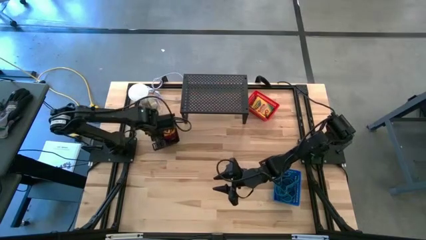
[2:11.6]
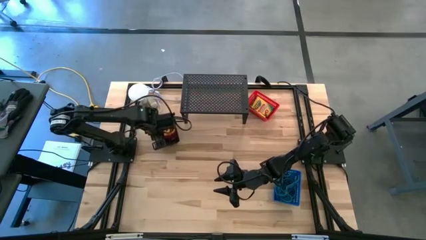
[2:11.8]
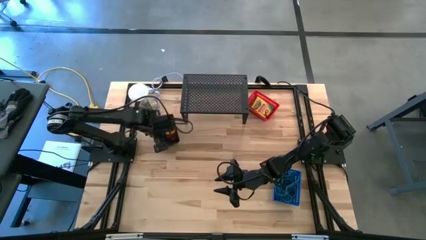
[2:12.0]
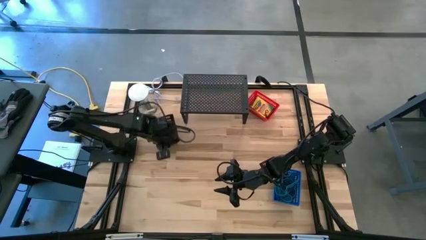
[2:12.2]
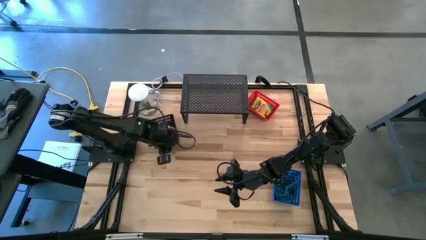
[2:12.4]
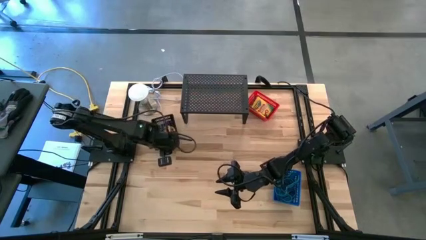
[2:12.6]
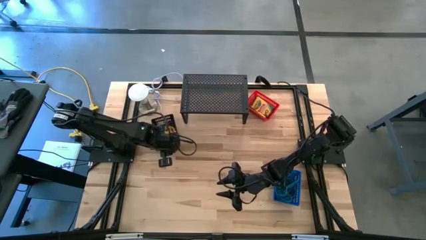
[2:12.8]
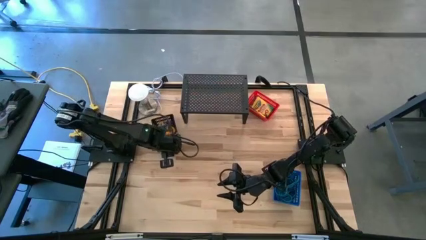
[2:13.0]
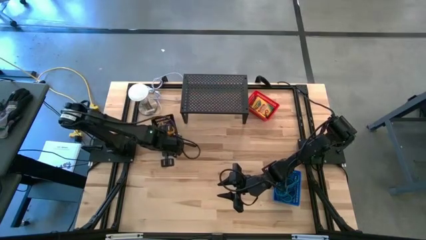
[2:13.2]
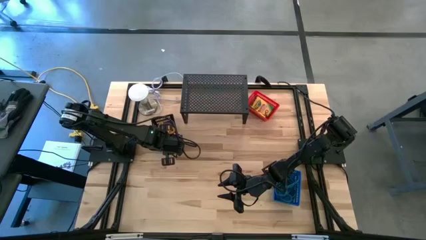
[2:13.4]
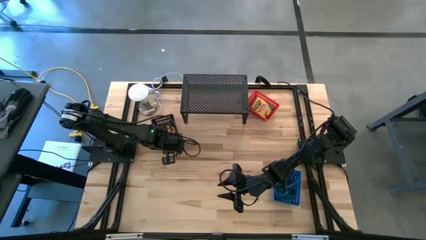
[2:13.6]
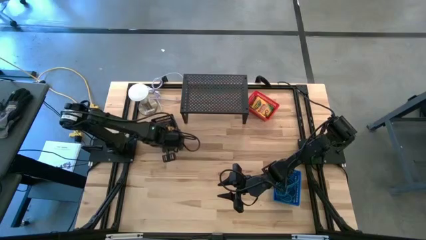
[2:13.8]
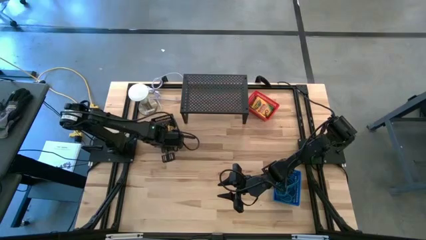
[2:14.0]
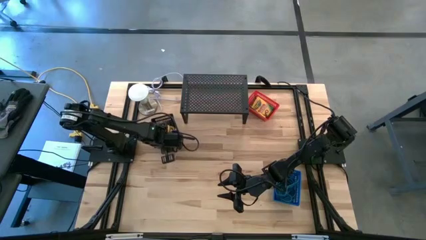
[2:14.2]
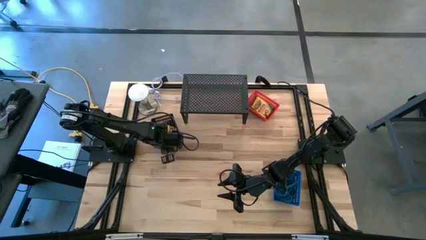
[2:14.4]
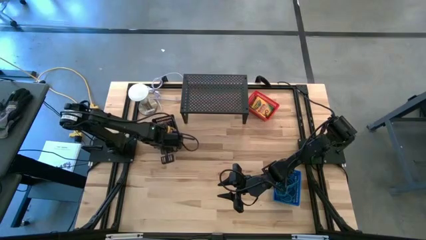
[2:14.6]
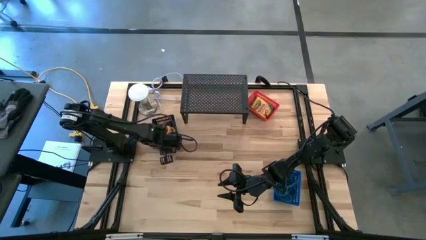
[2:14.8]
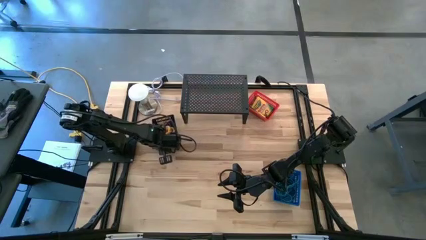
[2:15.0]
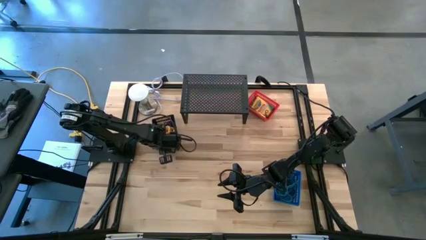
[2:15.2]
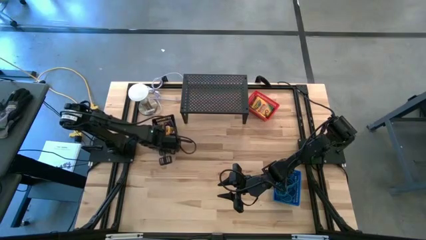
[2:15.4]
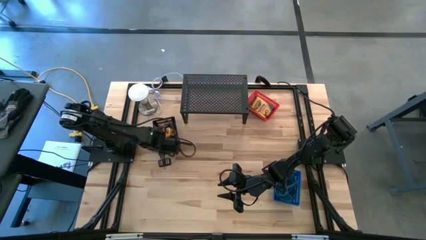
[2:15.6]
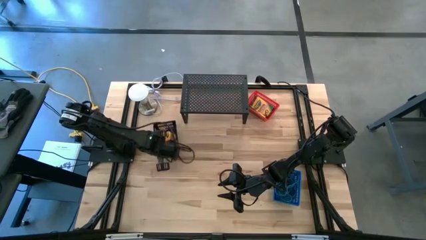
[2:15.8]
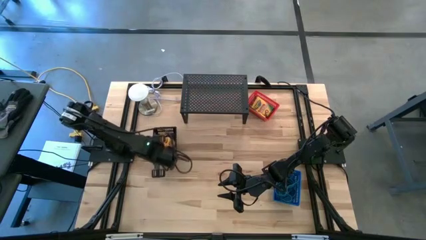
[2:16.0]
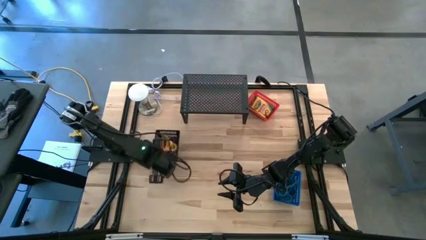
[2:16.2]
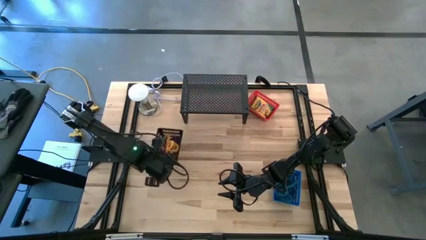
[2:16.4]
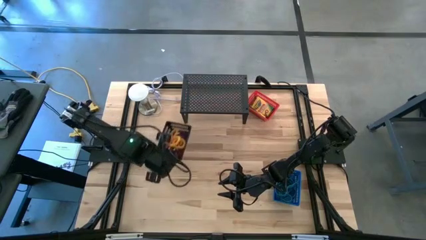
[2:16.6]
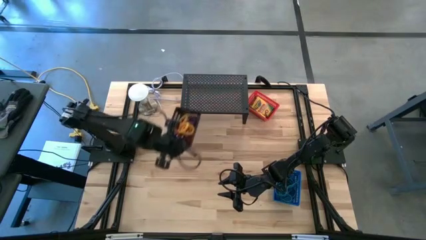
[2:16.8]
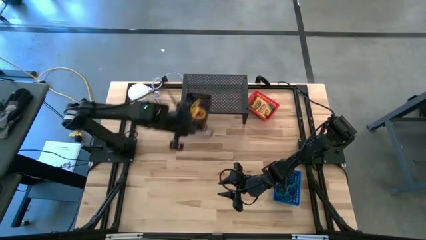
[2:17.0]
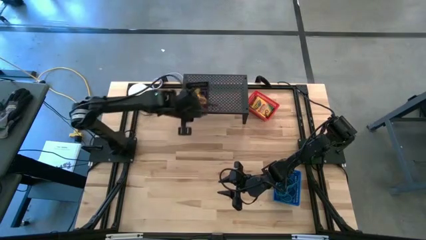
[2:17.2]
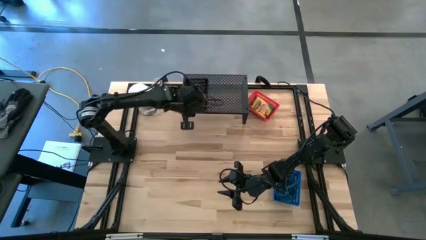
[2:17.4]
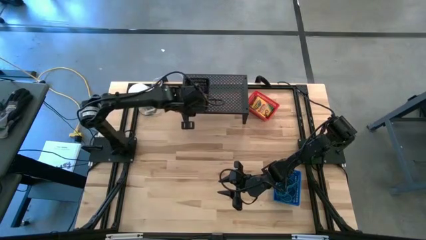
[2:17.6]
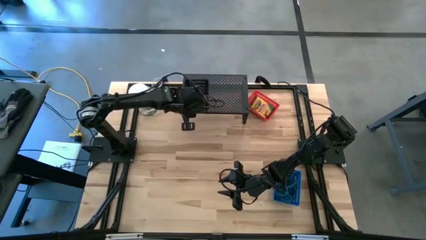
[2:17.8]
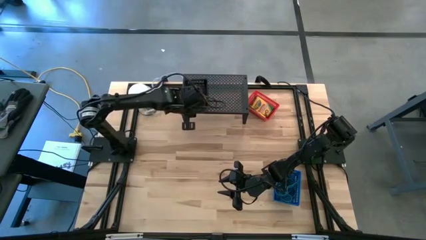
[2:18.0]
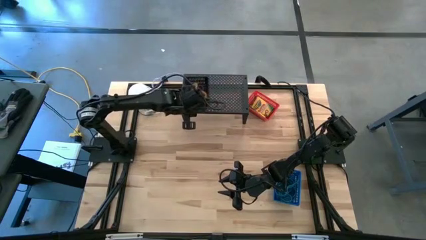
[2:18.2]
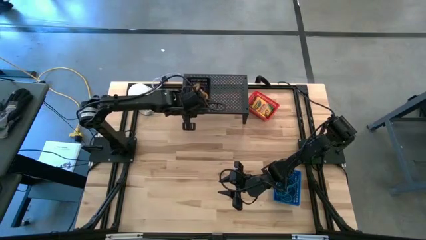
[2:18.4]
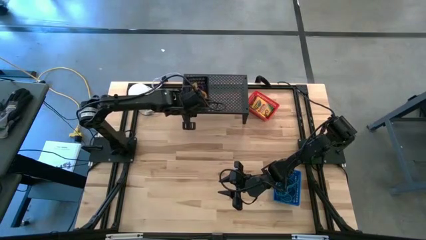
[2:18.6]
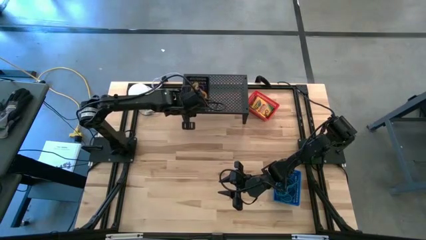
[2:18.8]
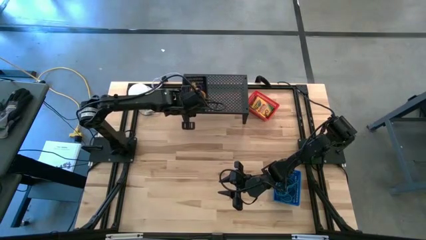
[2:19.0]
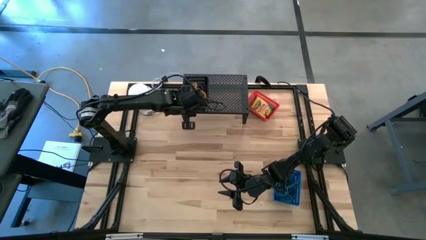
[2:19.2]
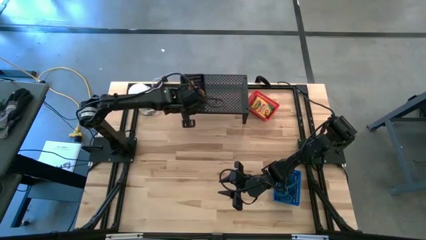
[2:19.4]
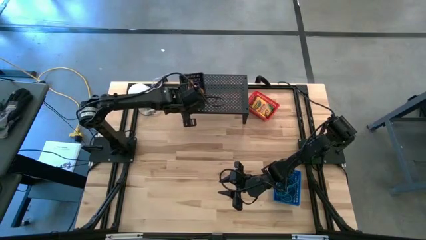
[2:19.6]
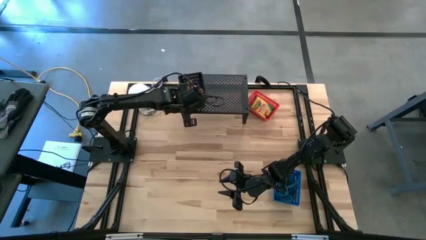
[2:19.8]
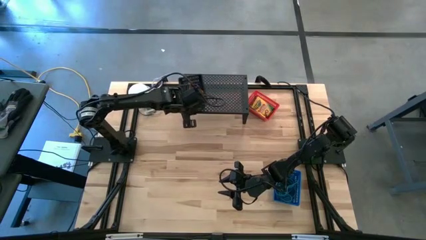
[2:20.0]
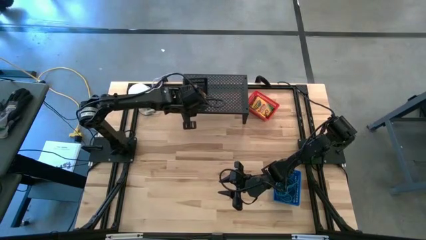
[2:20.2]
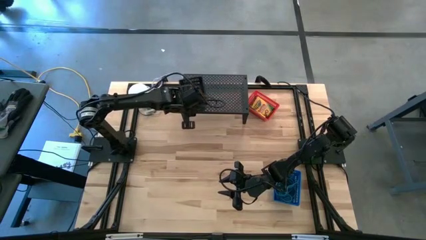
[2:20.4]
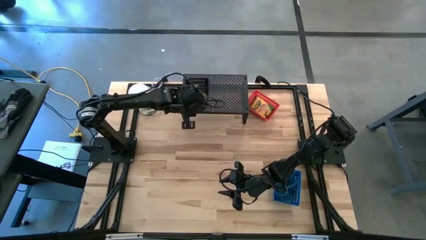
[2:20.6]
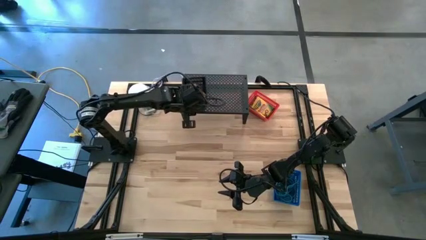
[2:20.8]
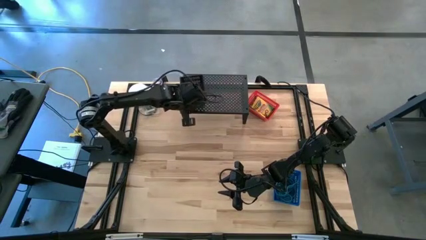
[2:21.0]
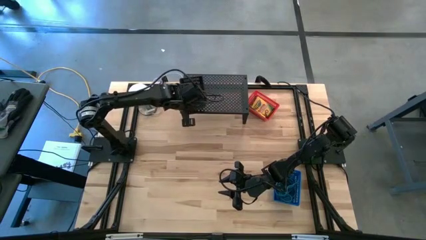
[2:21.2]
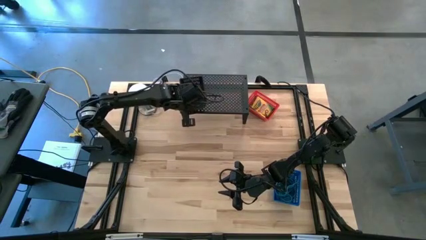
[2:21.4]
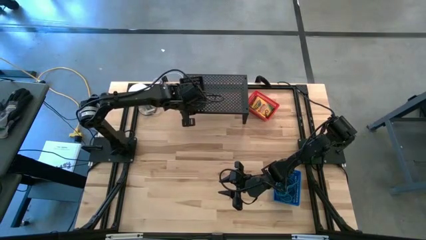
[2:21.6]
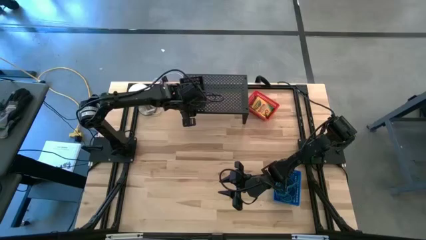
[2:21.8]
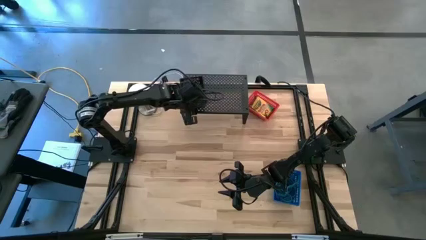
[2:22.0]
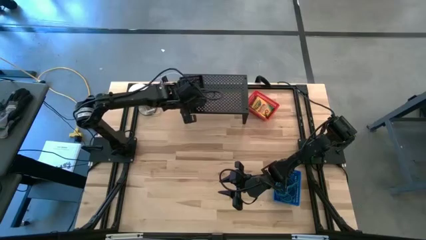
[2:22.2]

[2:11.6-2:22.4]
Task: Pick & Place Office Desk Supplies
Put the black basket on the shelf

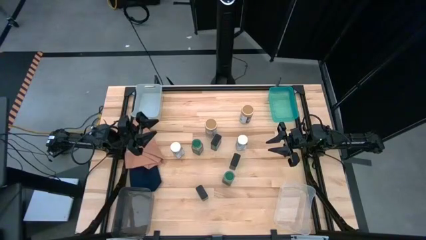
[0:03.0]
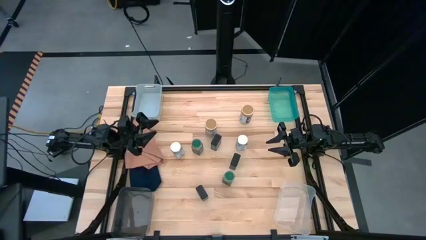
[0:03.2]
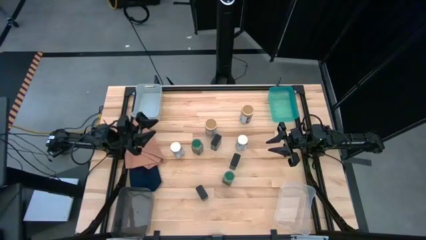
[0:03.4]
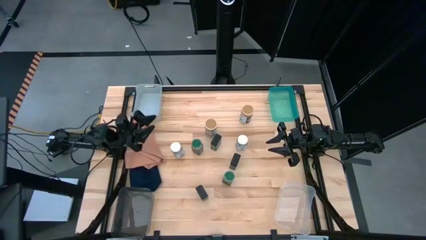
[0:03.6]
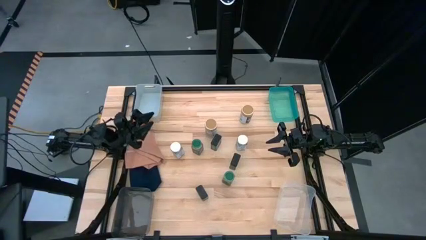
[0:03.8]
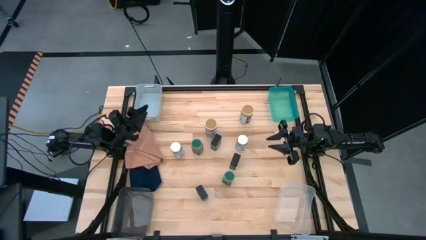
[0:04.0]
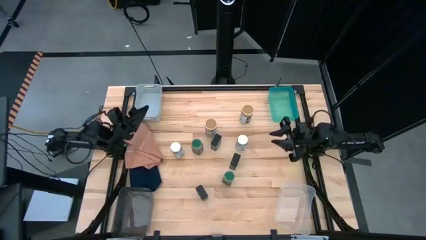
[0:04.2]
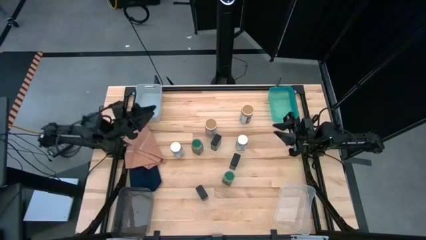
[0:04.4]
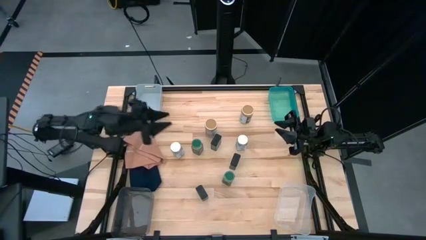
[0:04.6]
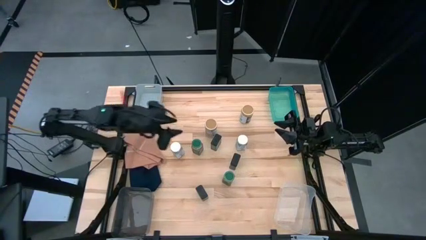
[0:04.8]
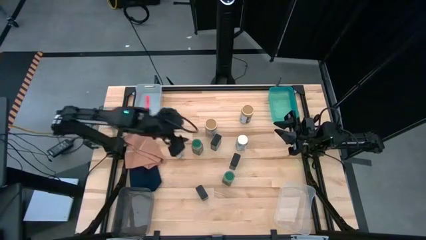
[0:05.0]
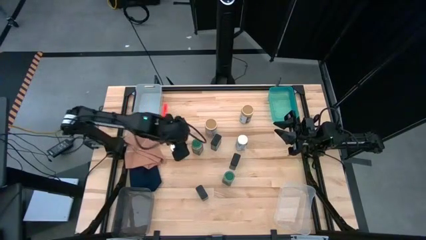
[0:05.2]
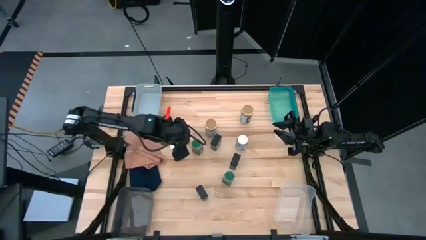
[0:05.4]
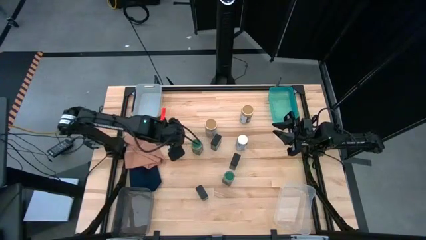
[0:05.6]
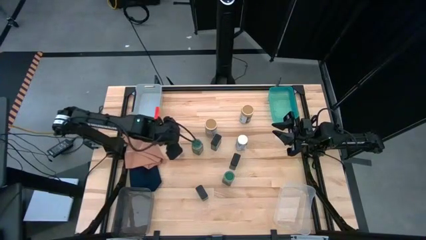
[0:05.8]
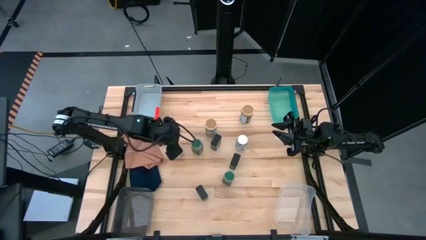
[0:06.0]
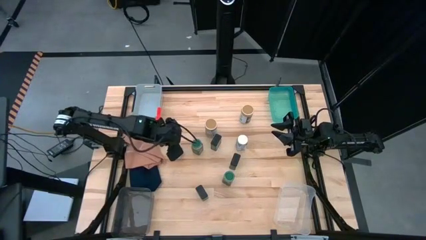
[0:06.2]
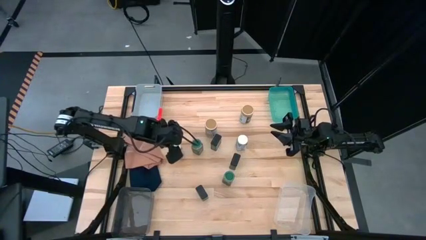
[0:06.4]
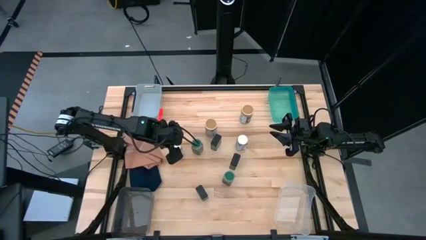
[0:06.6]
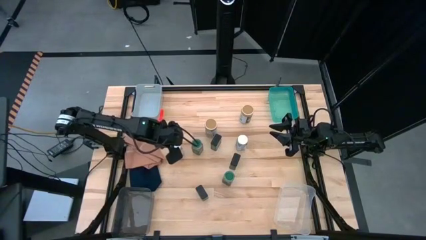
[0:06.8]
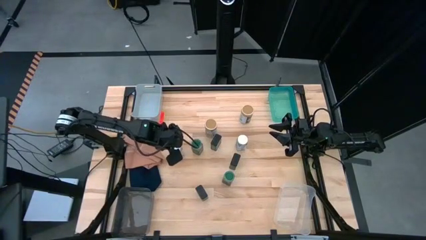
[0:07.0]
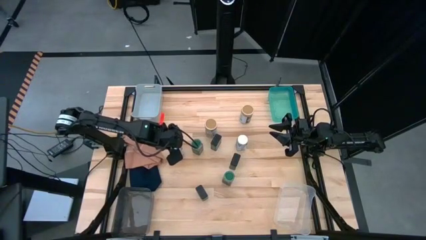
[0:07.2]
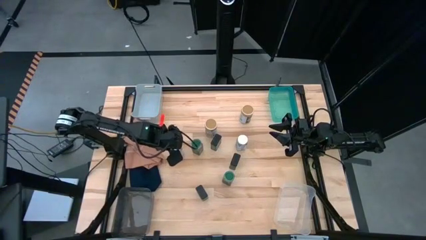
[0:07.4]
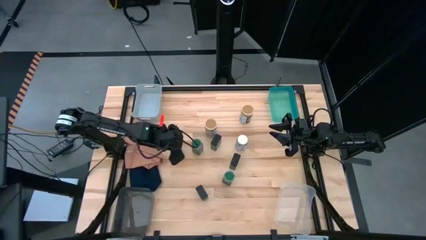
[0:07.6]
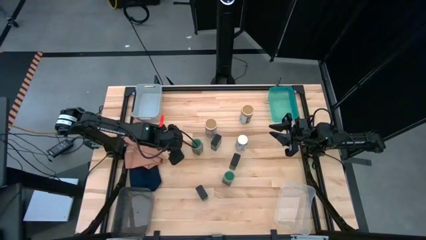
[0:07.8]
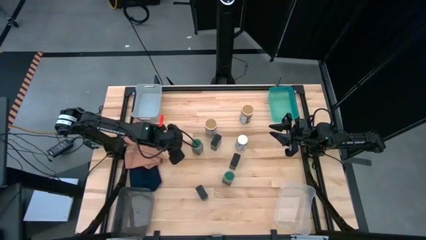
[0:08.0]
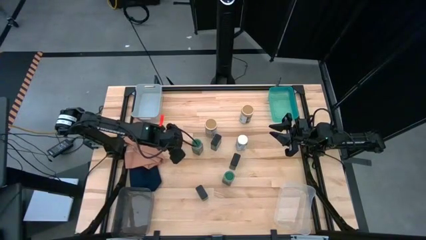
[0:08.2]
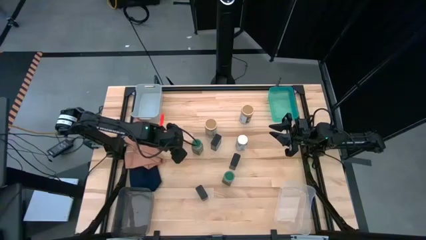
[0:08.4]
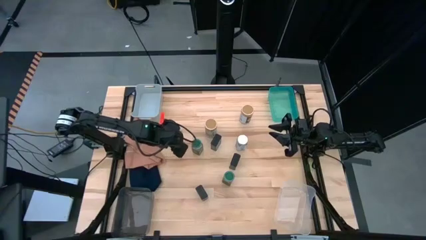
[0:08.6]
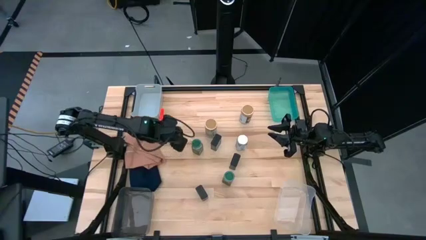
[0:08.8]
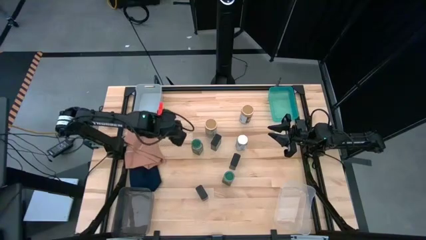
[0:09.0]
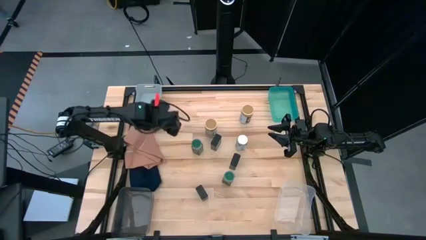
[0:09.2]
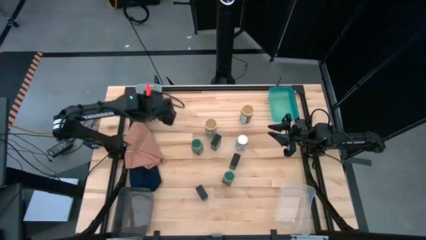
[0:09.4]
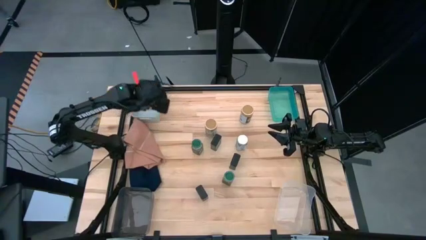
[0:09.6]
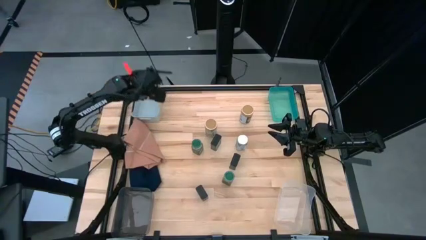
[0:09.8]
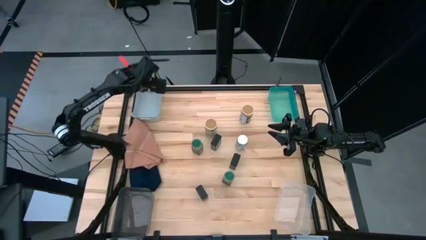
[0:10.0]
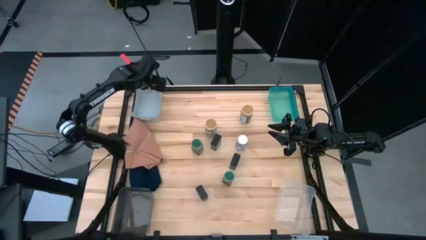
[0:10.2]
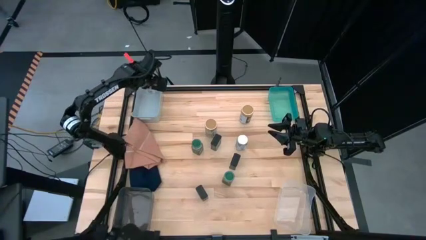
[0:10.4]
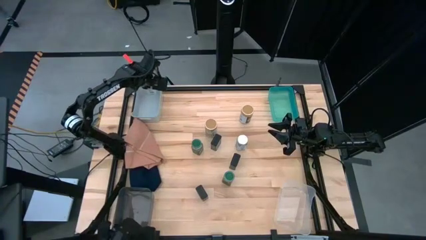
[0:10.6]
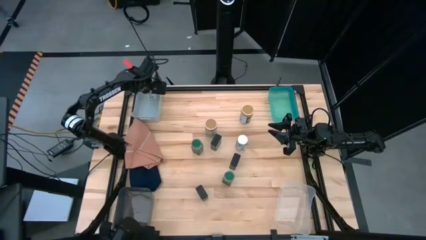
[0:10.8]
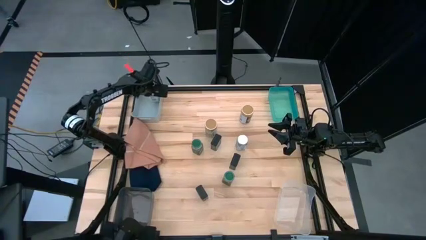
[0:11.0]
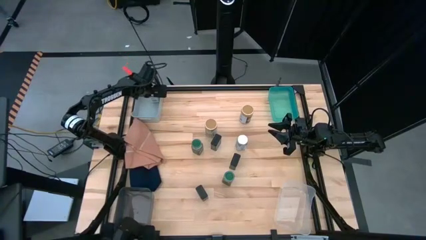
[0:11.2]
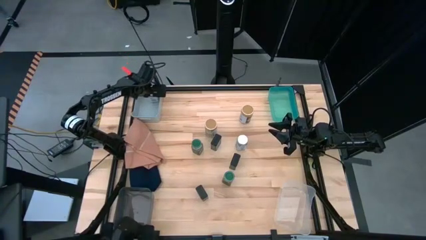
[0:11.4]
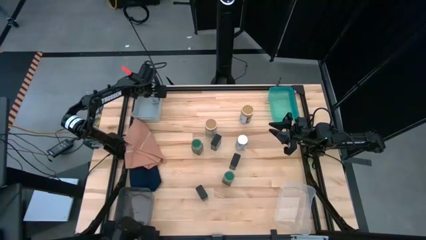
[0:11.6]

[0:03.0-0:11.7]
Task: Sort spices by type
Put the left white spice bottle into the grey bin
